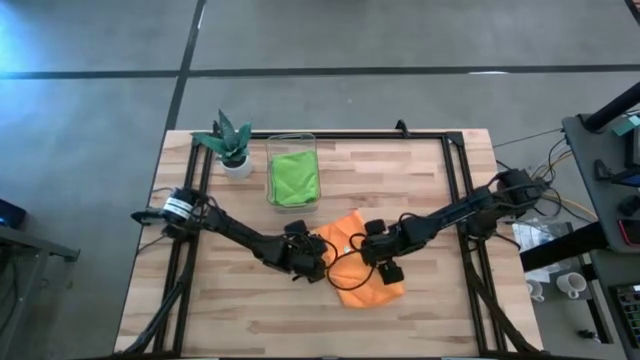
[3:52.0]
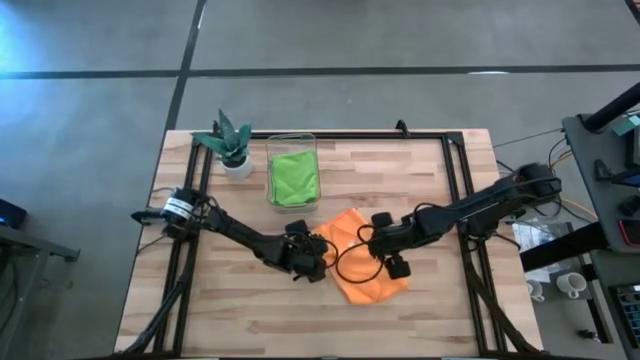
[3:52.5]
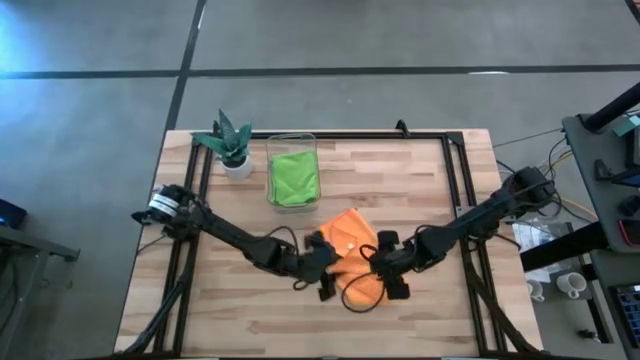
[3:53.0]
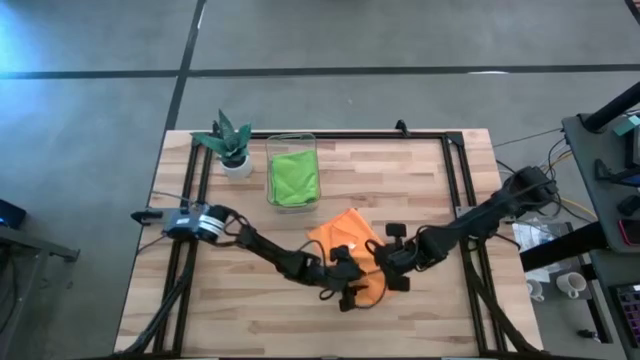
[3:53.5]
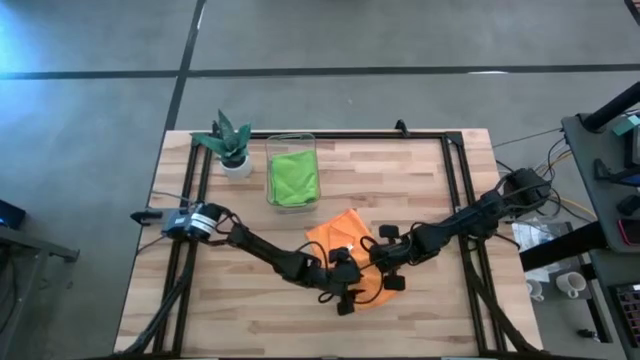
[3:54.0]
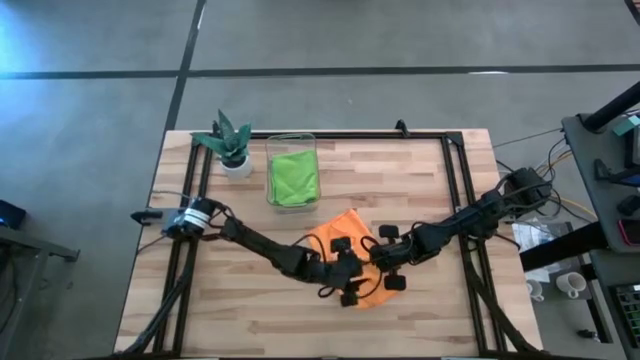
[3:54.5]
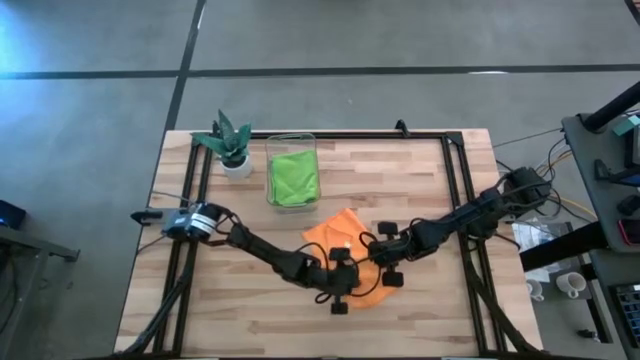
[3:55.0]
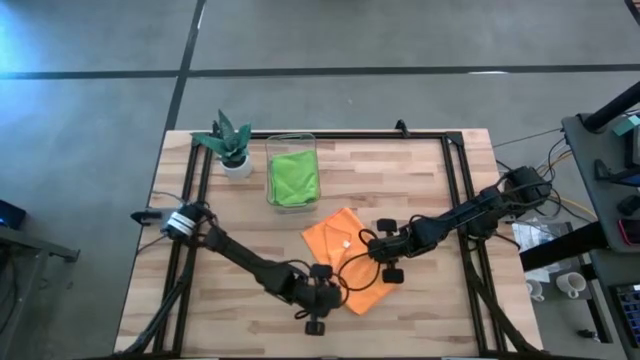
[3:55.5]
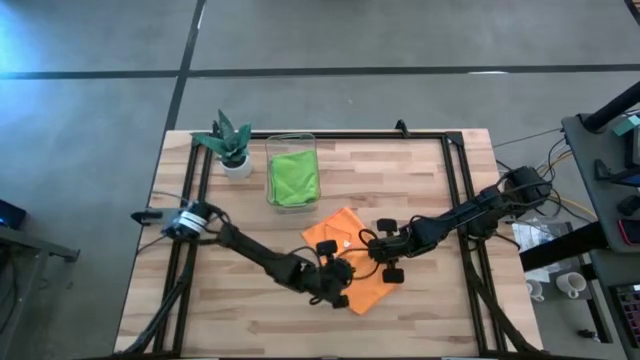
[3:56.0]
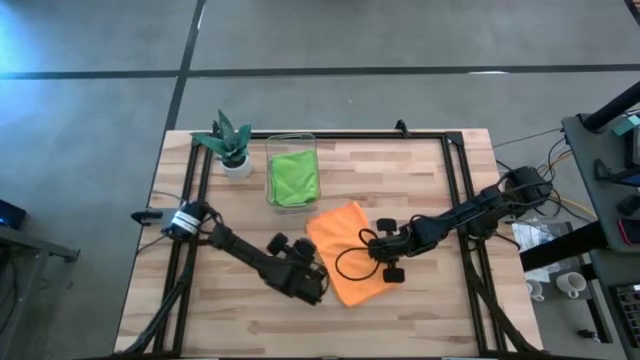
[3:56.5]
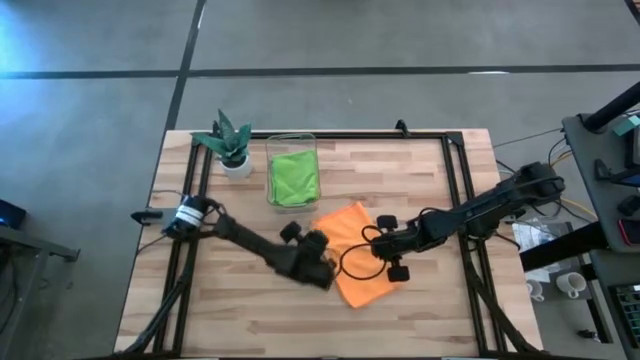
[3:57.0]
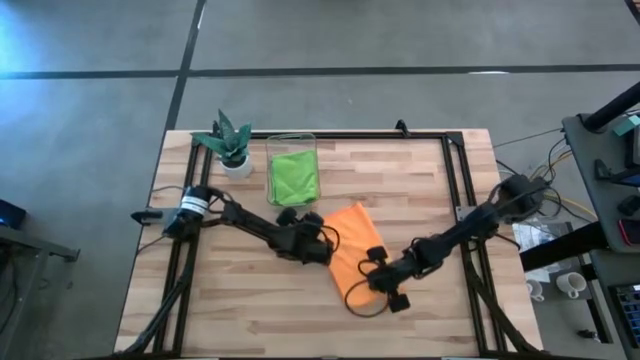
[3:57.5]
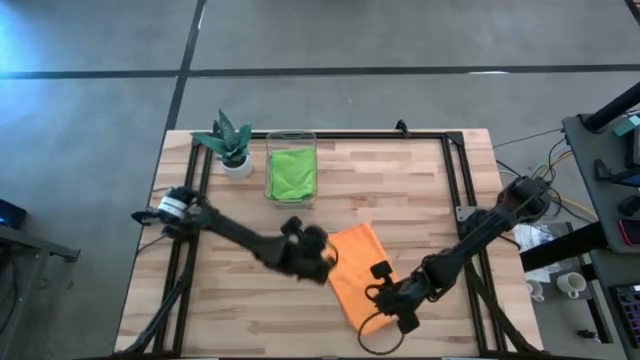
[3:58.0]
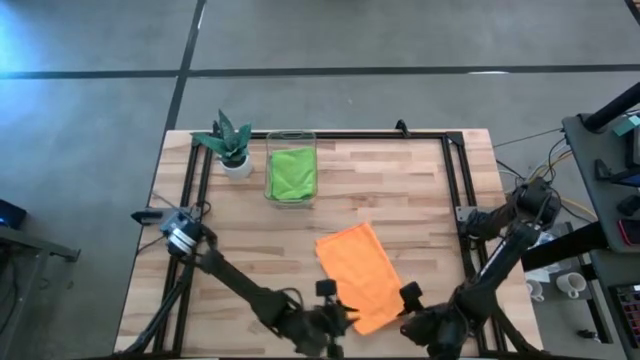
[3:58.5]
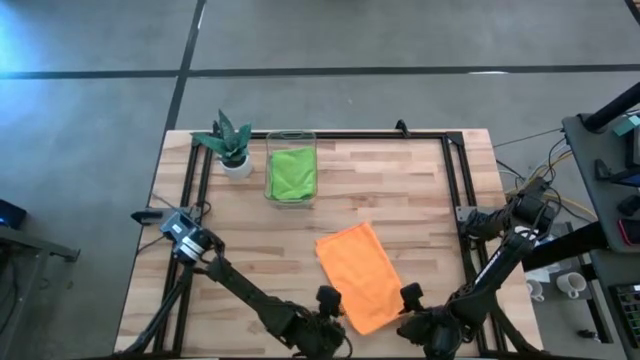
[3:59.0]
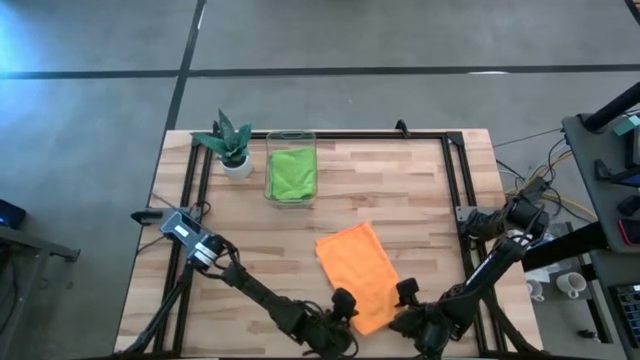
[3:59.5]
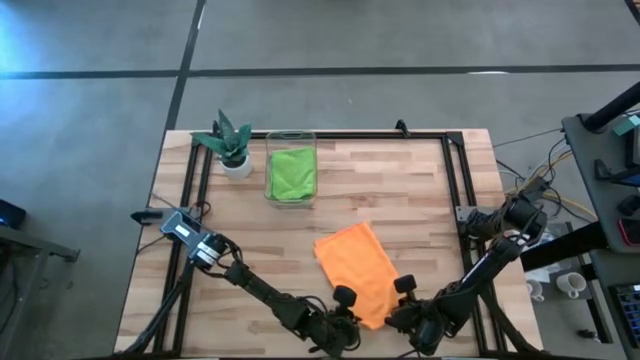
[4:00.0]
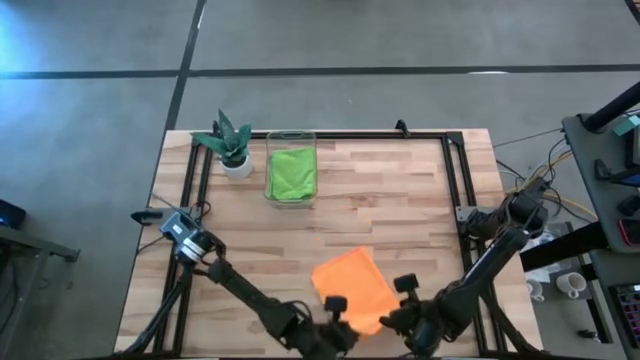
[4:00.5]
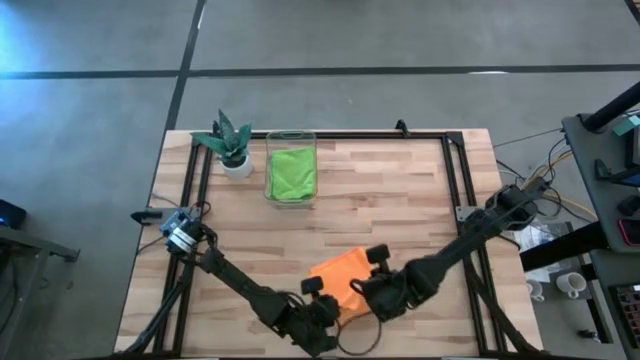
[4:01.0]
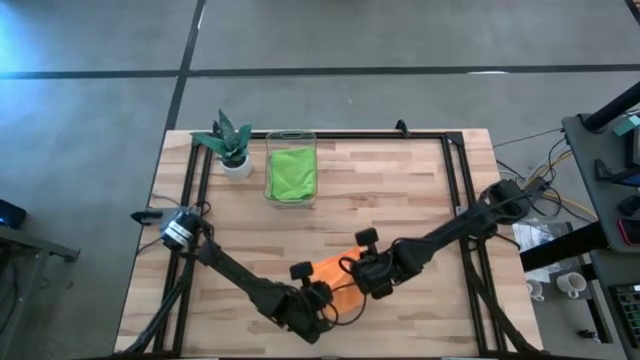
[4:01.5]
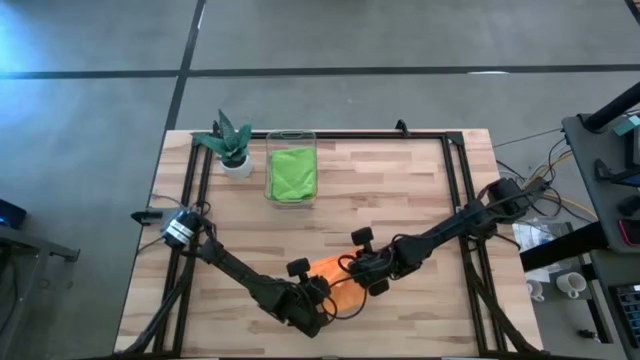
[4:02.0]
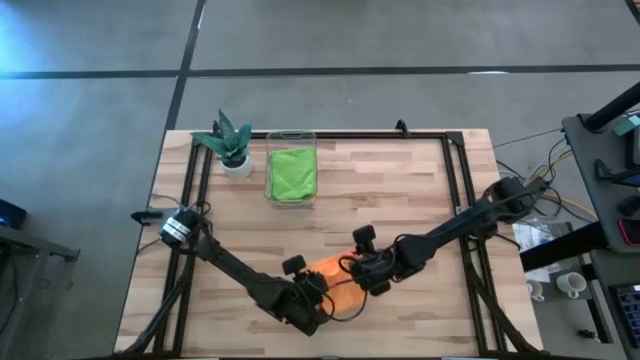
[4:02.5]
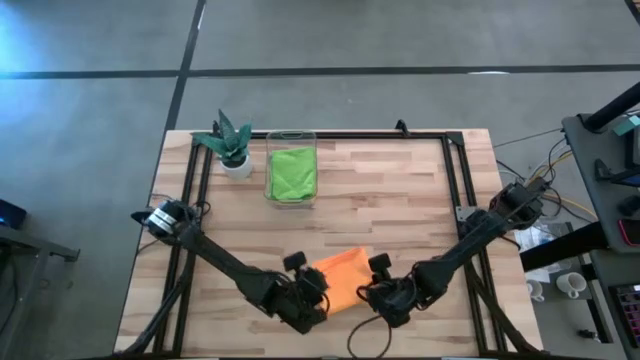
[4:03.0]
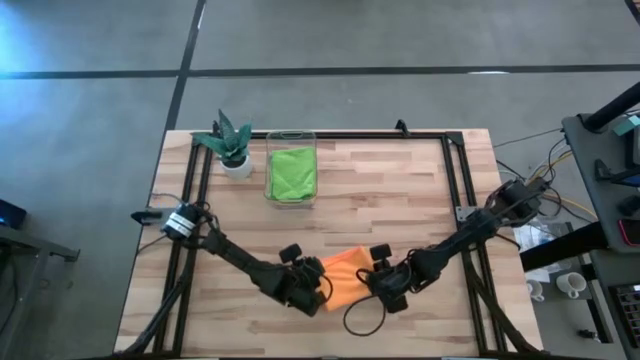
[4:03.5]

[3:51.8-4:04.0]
Task: Fold microfiber towels
Fold the orange microfiber cloth

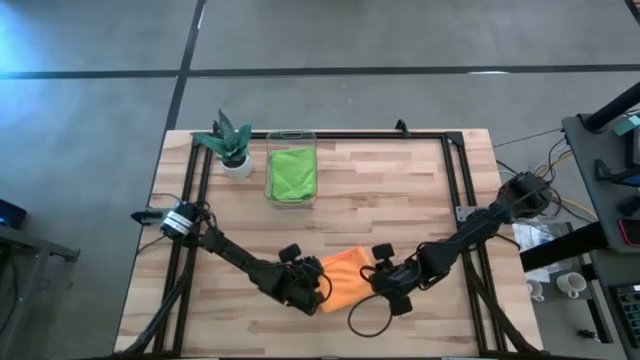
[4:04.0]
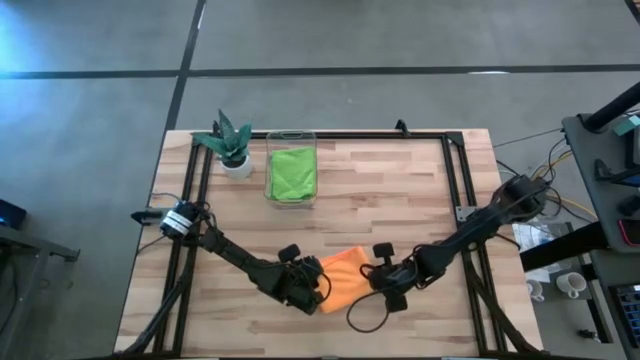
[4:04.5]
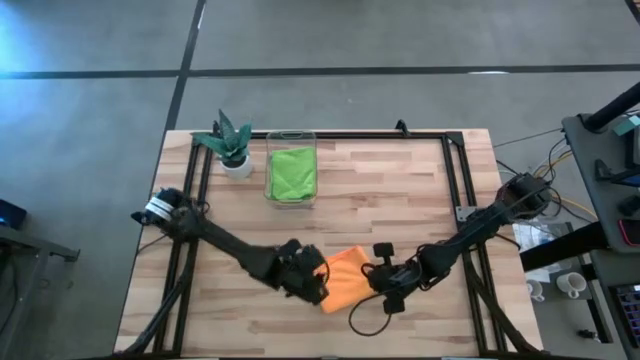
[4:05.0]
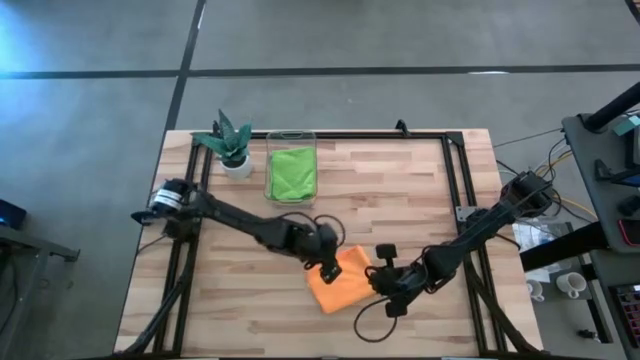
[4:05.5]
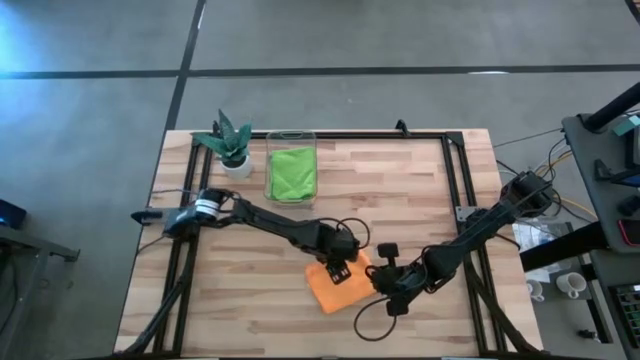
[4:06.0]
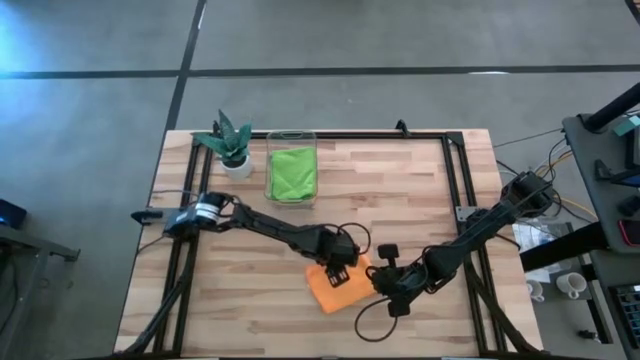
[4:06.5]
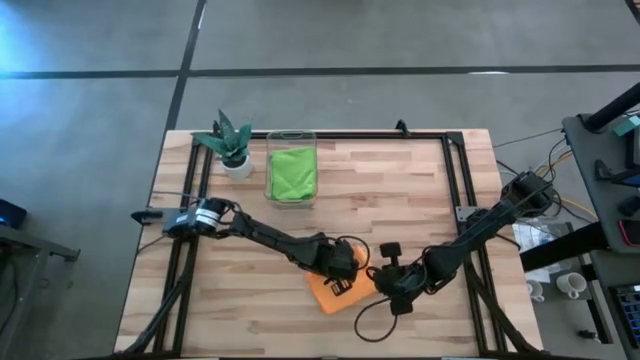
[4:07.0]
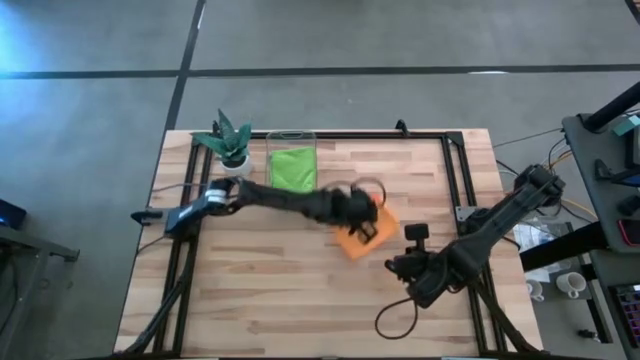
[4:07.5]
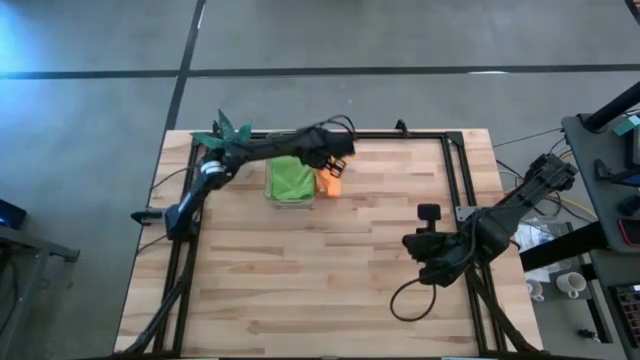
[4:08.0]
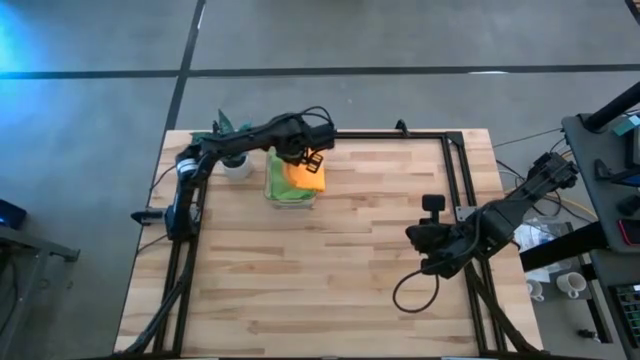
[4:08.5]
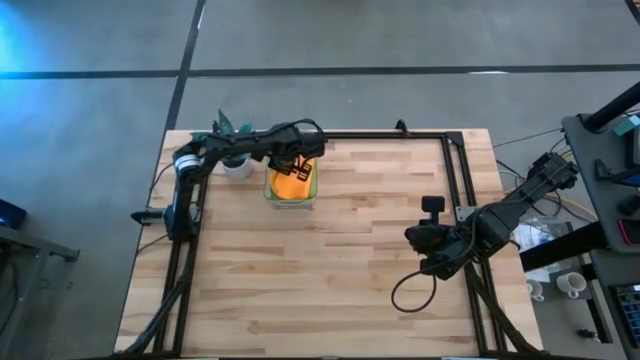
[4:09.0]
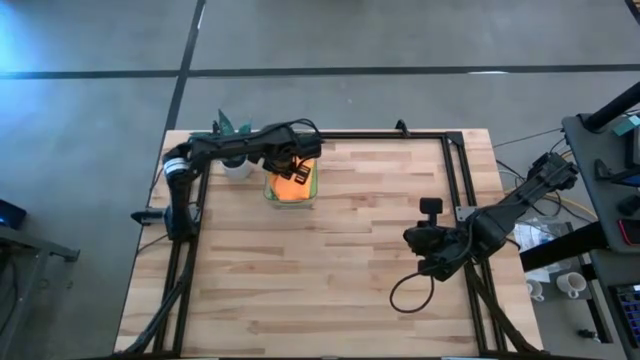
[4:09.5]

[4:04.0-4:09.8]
Stack the orange microfiber cloth on top on the green microfiber cloth into the bin
